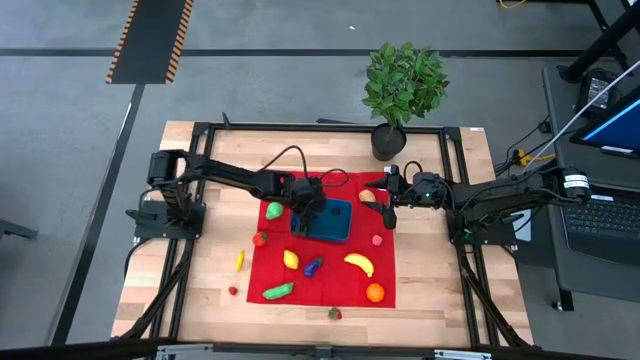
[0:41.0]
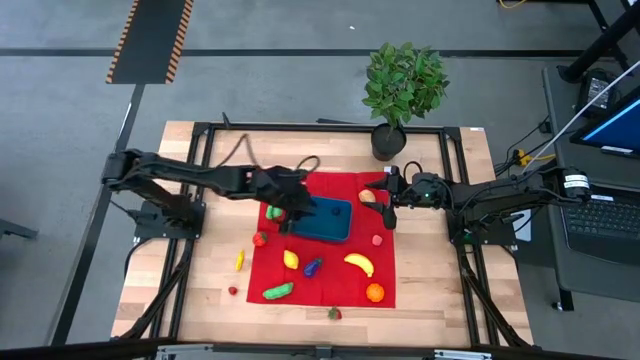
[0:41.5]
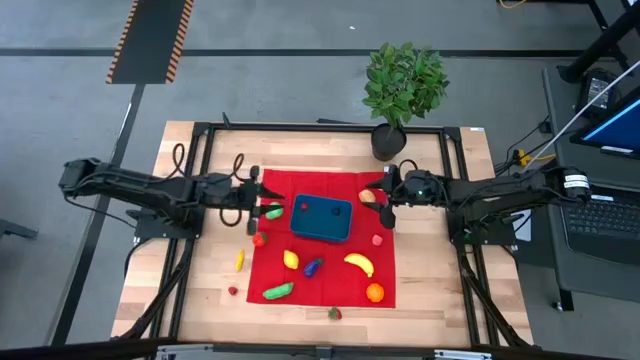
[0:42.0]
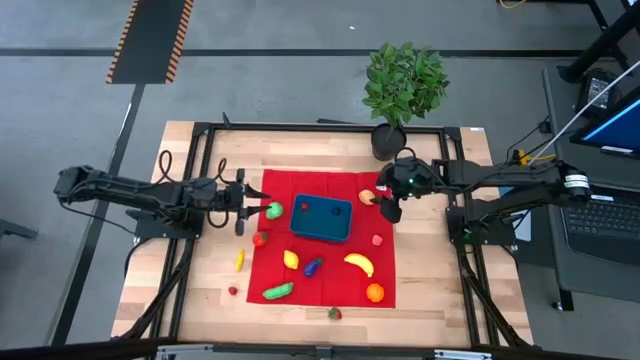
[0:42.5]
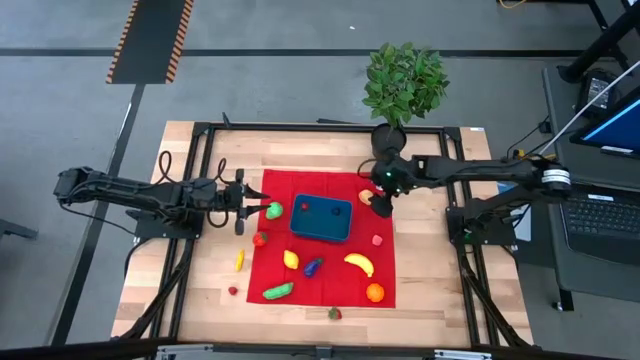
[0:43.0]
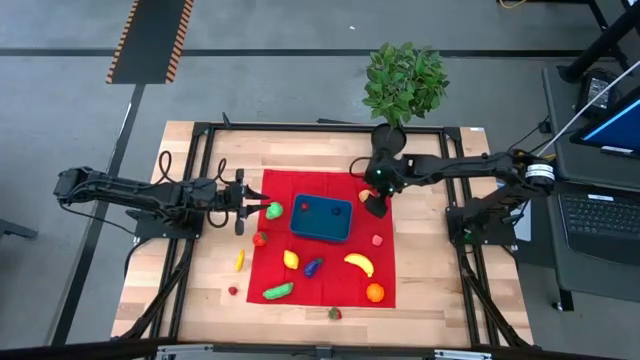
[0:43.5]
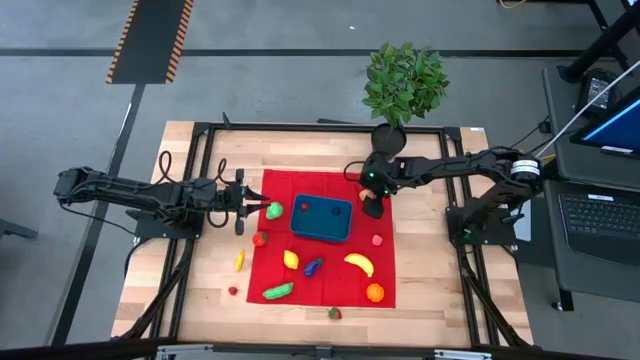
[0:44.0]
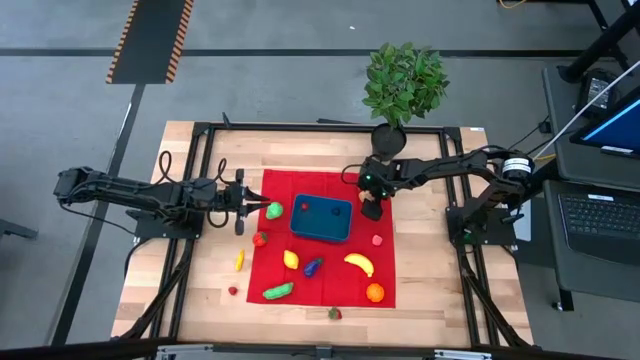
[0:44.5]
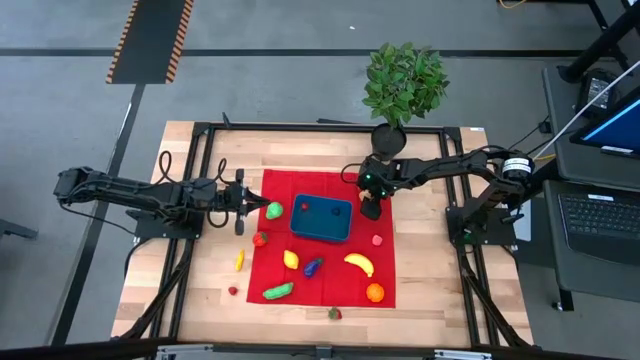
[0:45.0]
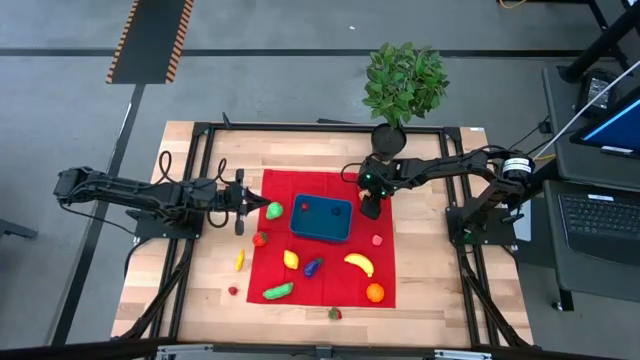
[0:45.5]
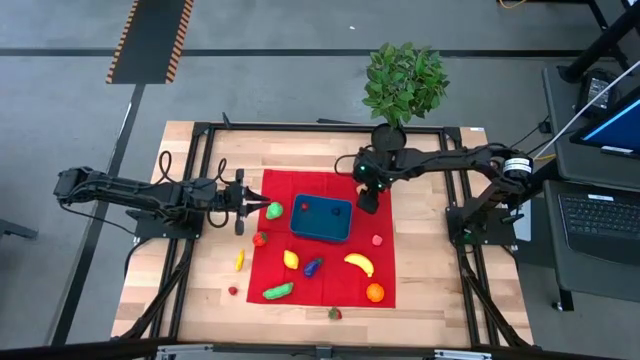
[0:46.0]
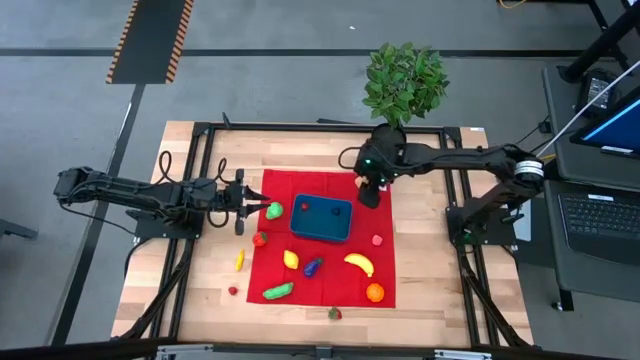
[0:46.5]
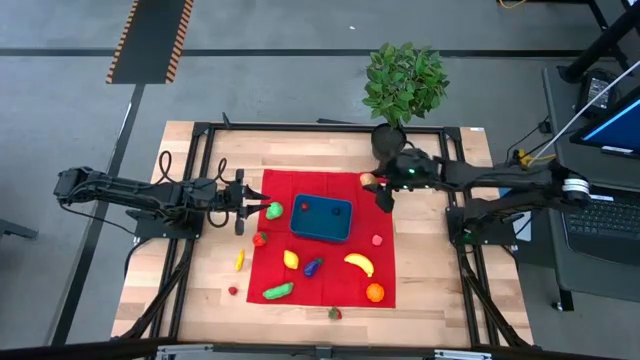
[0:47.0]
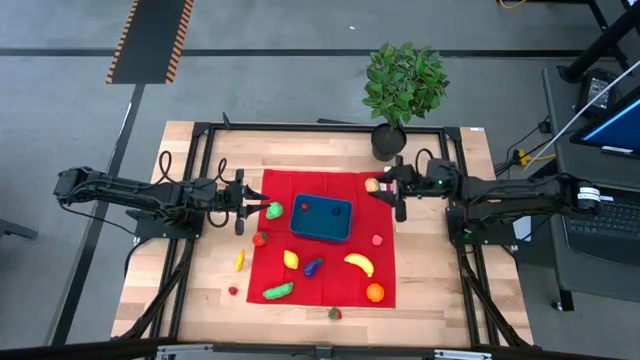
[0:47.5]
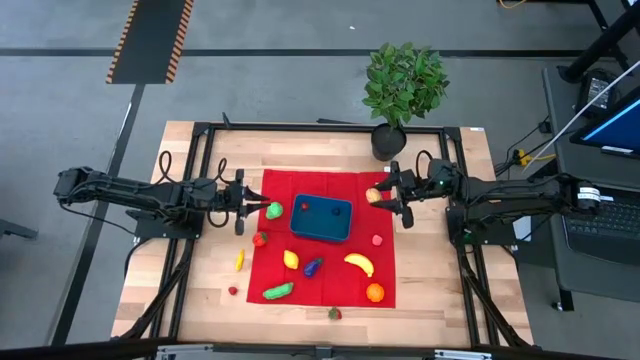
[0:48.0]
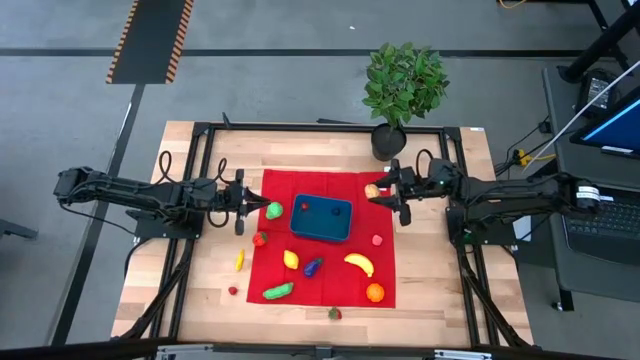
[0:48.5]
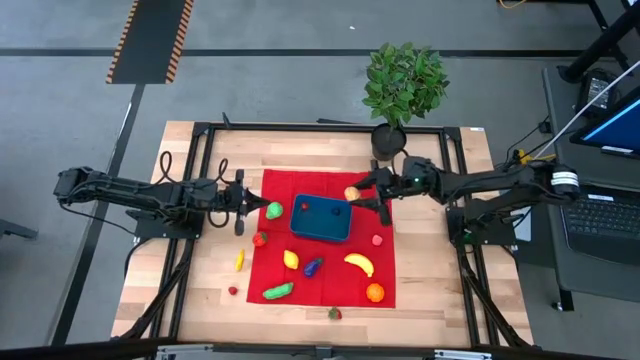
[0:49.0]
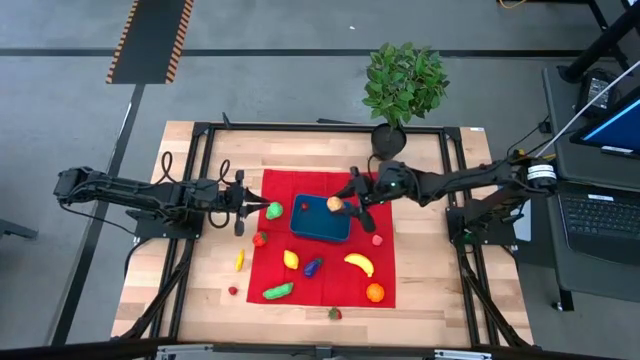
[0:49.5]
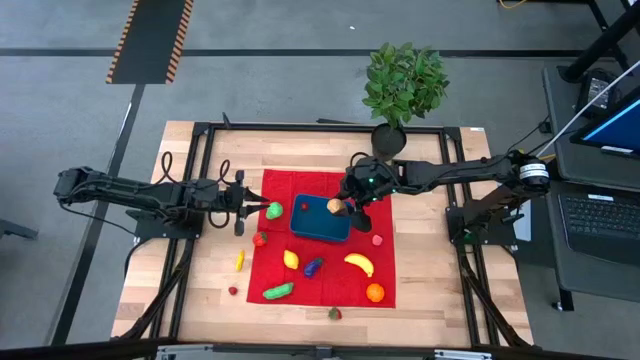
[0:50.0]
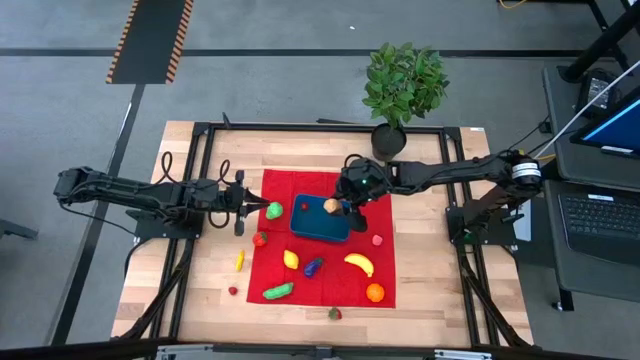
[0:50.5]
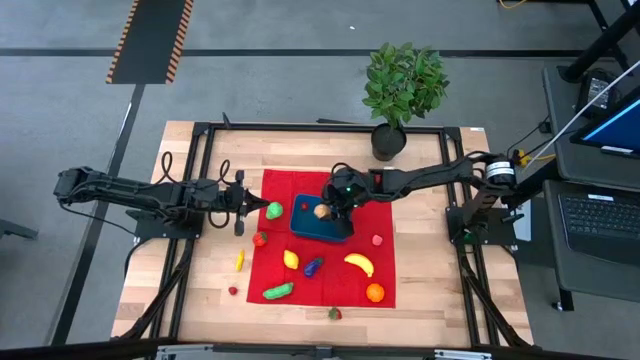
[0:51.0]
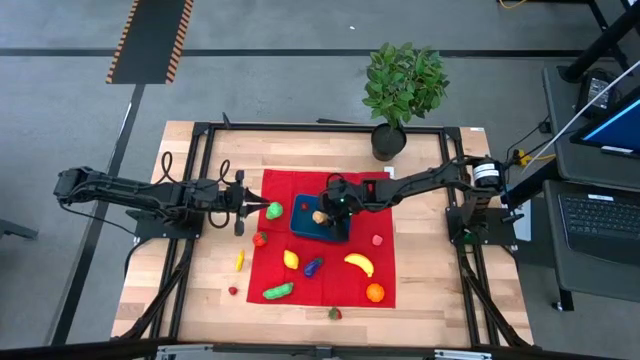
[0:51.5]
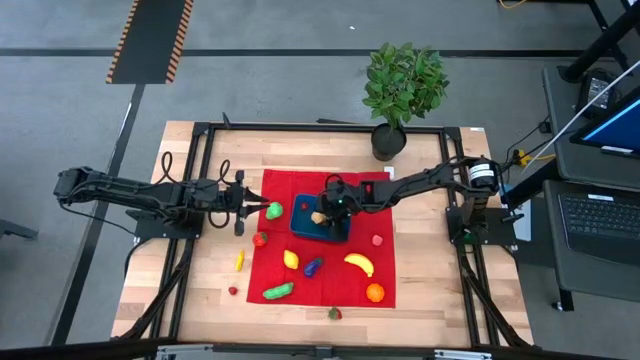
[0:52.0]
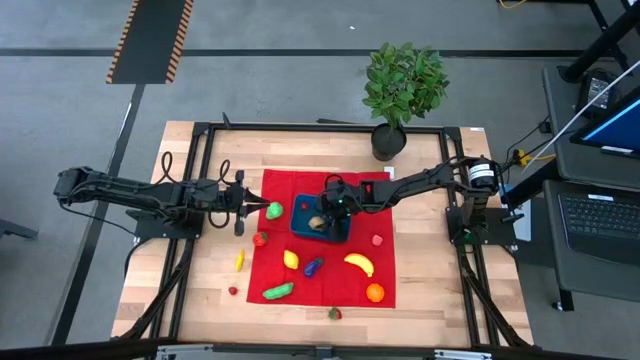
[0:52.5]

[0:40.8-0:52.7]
Task: Pick and placing Produce into tupperware
Put the brown potato into the blue bin

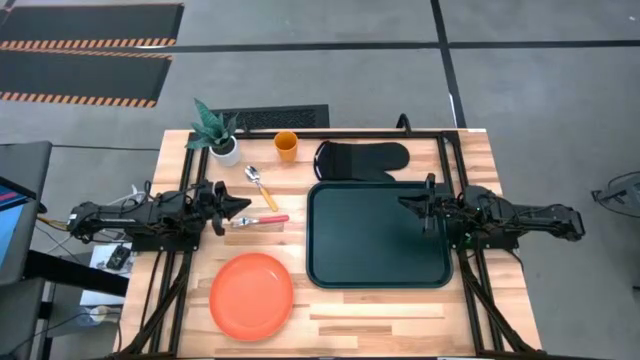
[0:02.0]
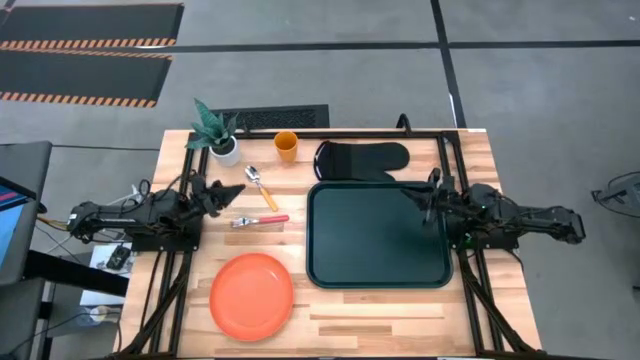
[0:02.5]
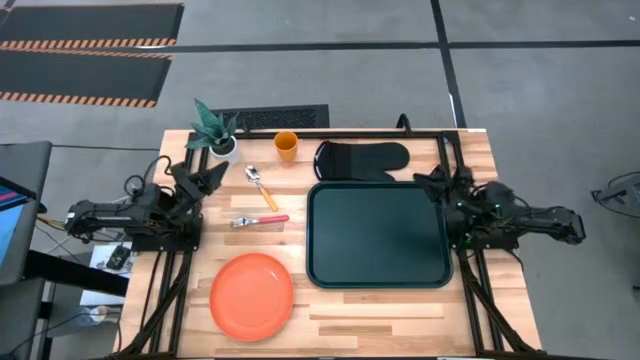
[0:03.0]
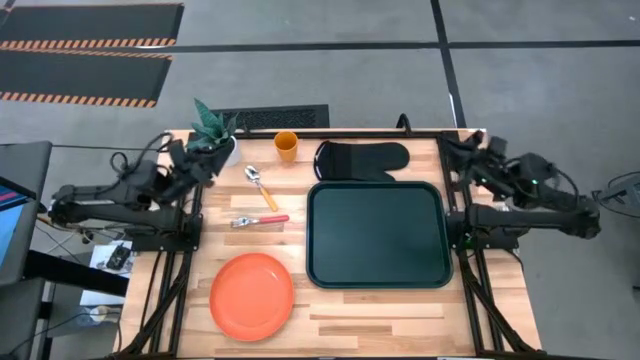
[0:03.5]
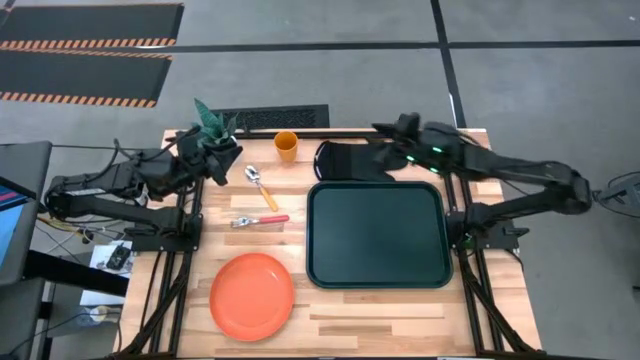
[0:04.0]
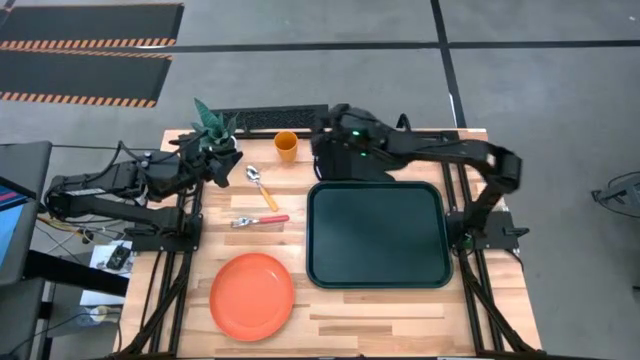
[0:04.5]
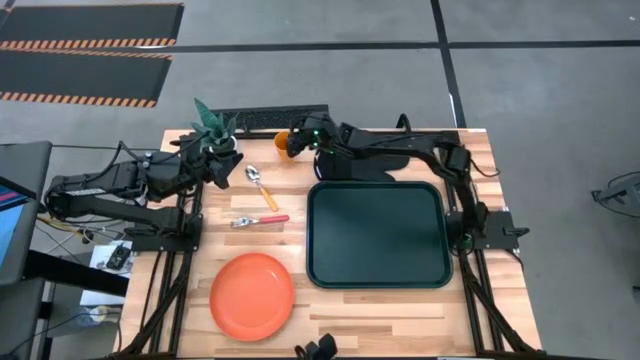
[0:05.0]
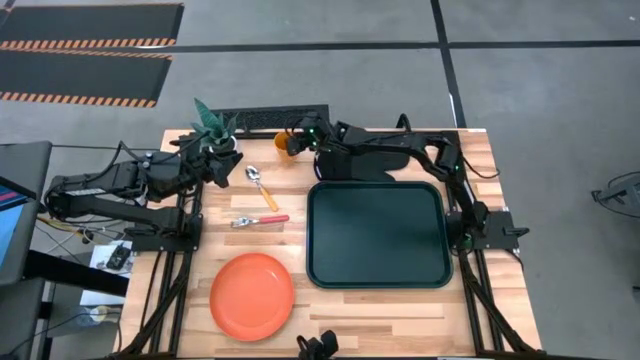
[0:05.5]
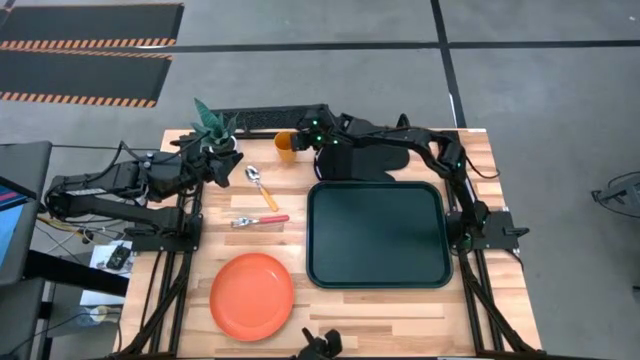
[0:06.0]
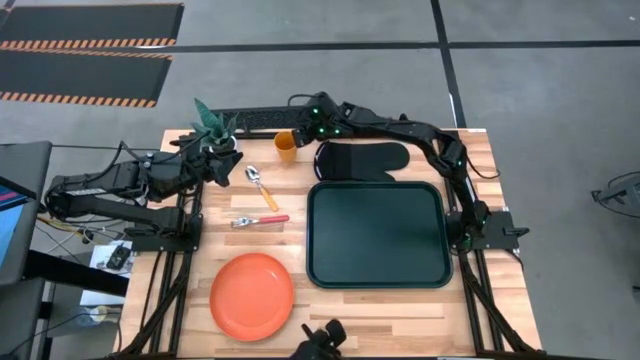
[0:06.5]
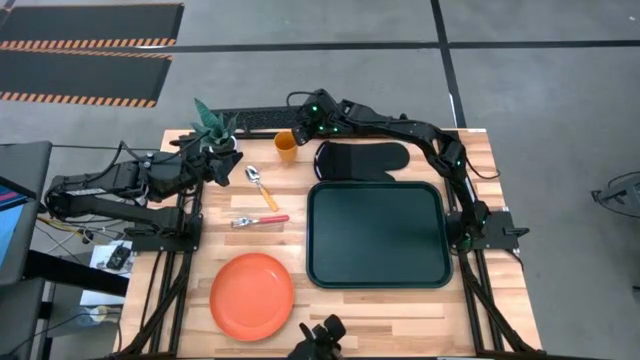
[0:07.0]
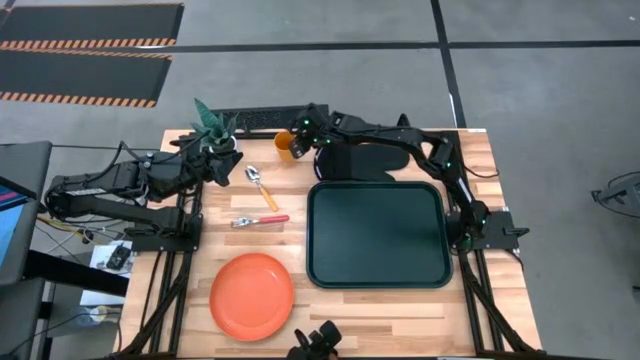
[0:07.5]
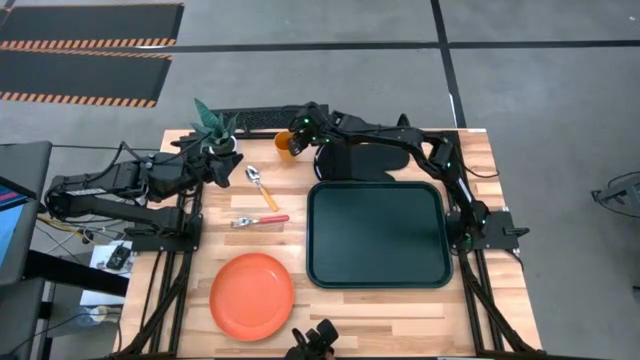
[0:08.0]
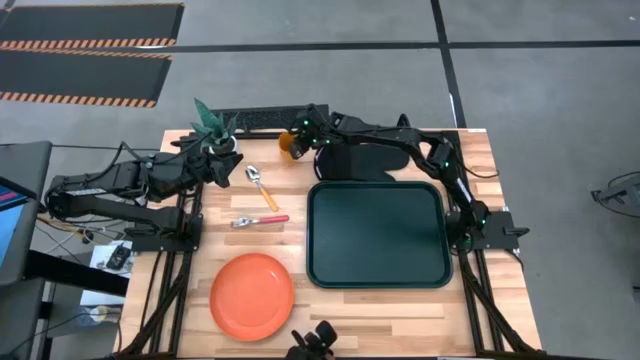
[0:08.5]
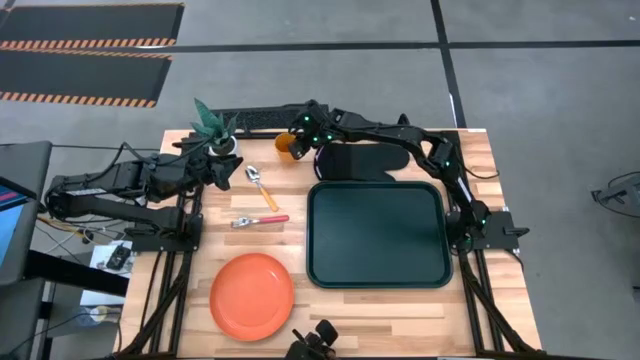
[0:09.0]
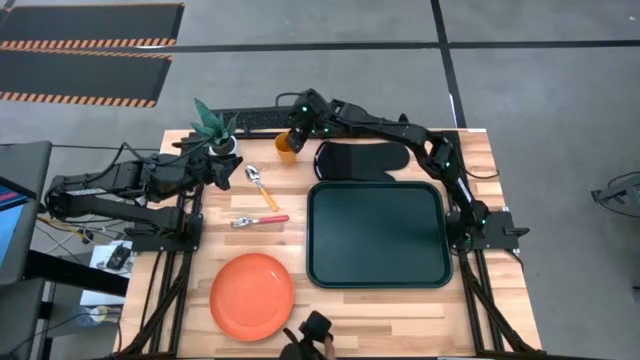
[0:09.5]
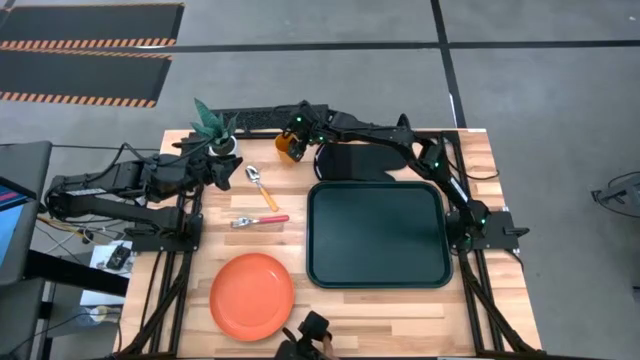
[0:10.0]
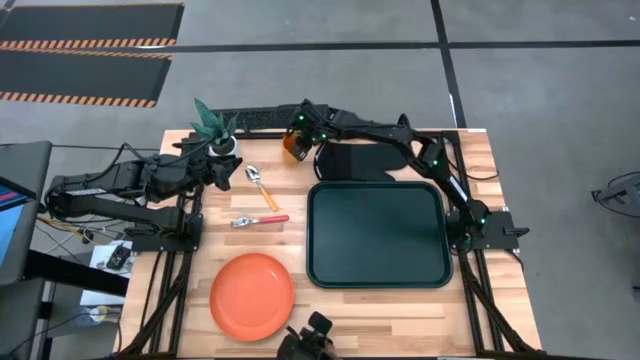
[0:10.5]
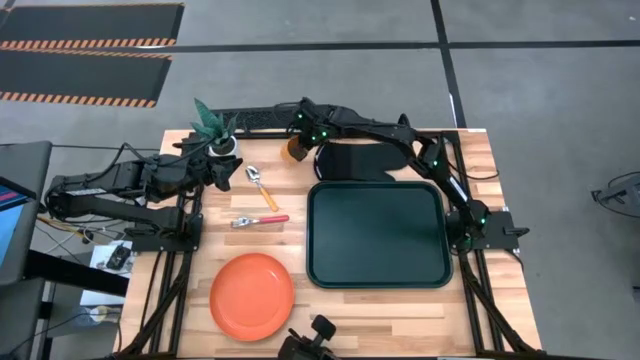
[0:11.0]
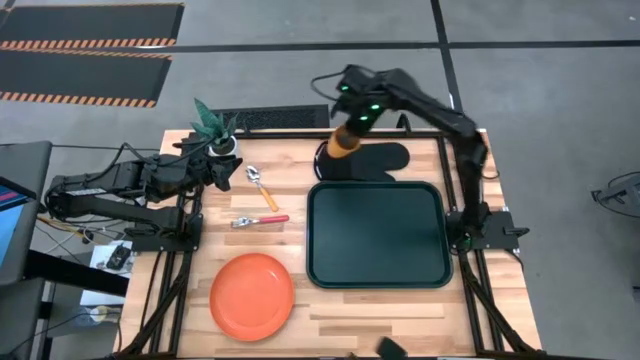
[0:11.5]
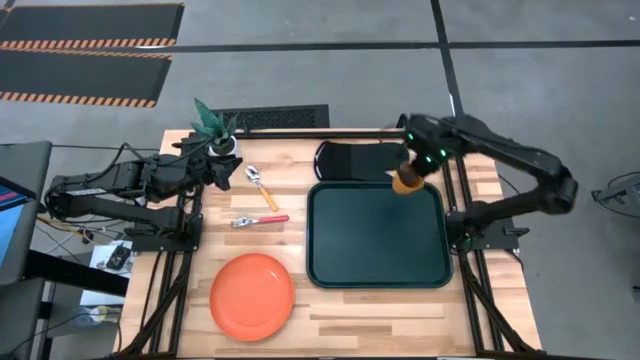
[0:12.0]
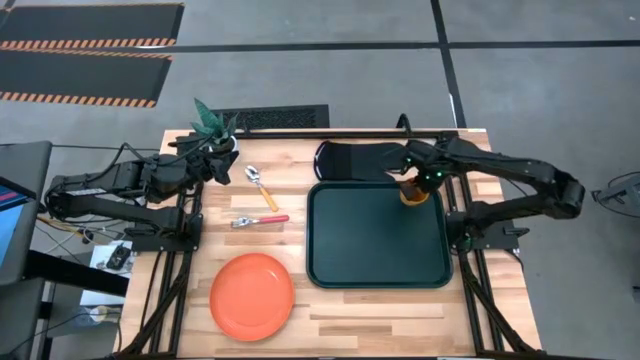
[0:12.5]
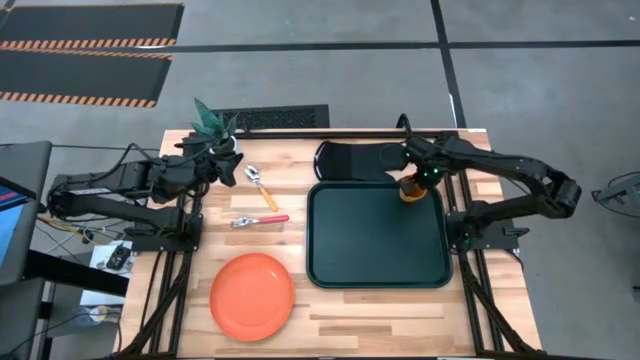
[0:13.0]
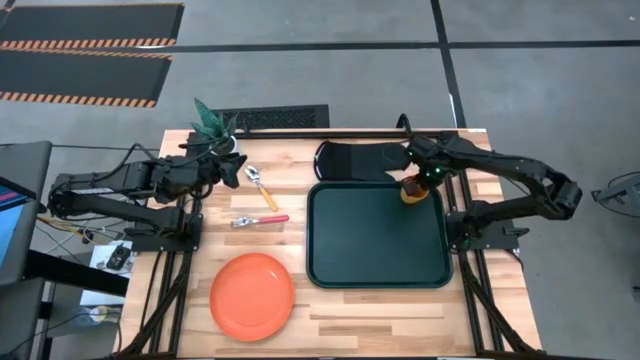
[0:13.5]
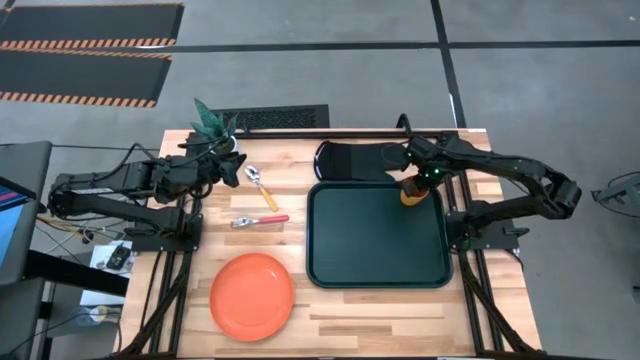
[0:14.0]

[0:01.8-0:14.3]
Task: Pick and place plate/cup/fork/spoon on tray
Put the yellow cup on the green serving tray
